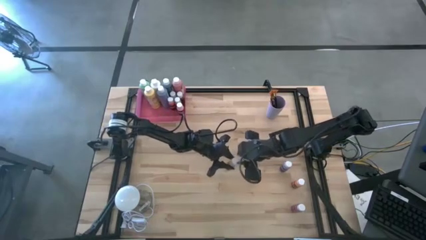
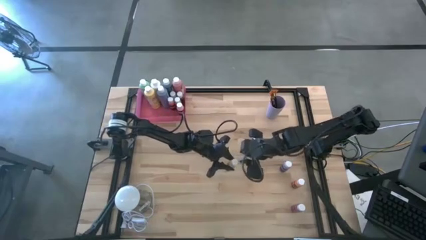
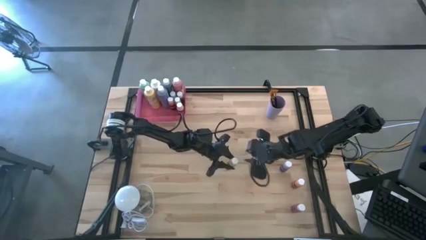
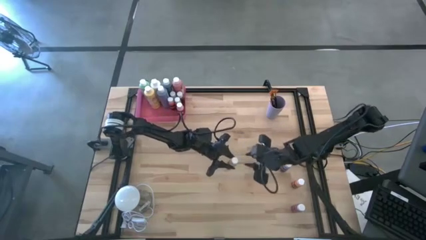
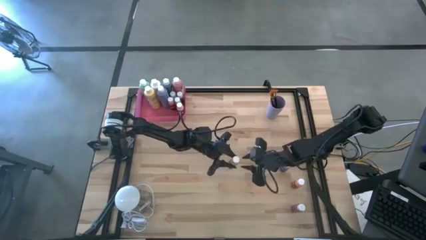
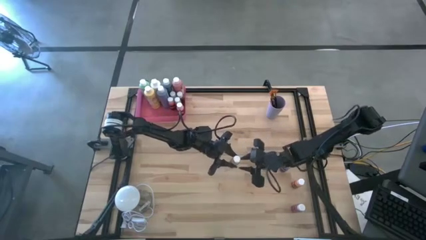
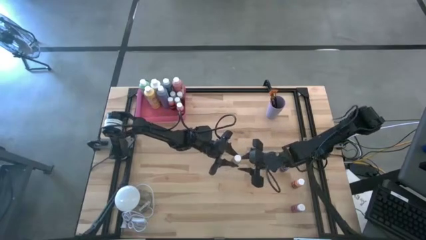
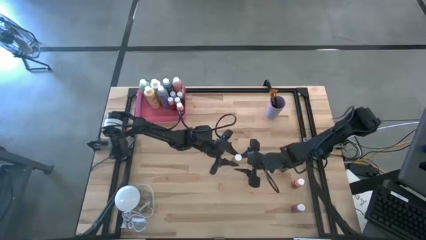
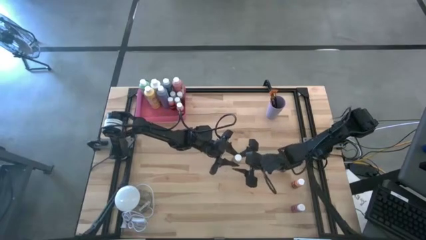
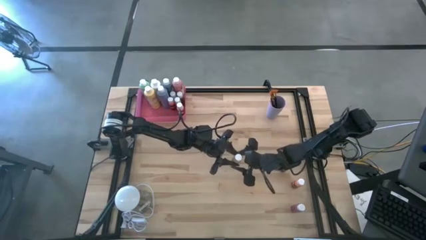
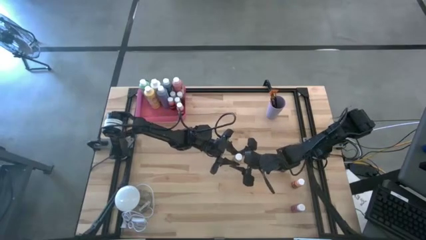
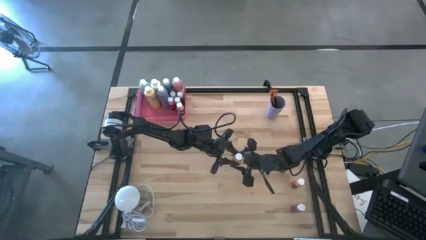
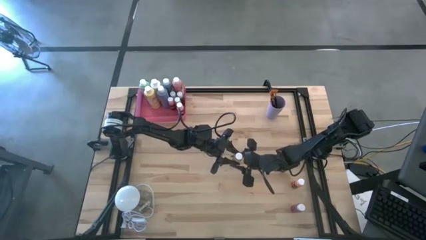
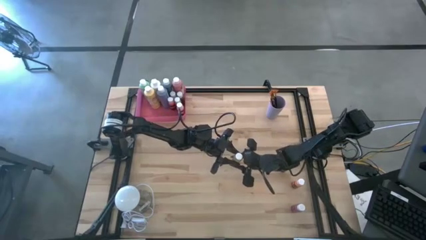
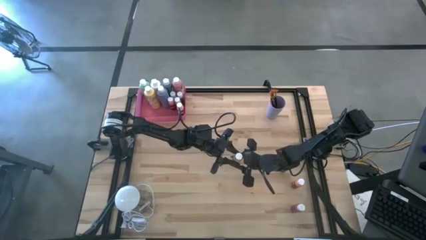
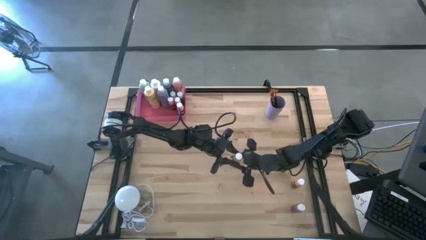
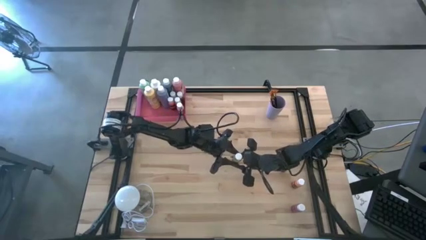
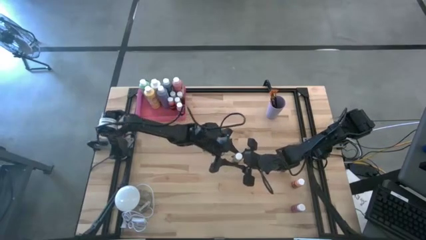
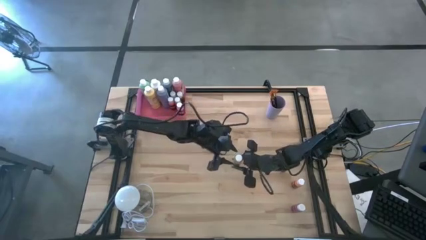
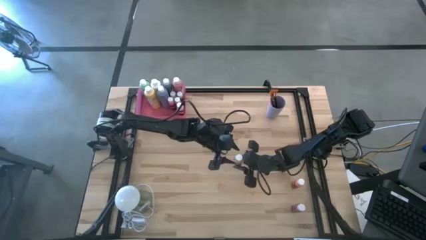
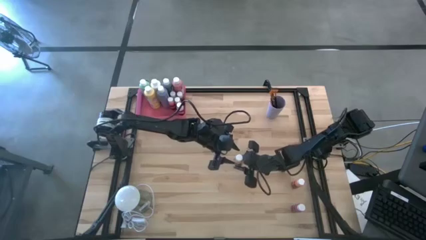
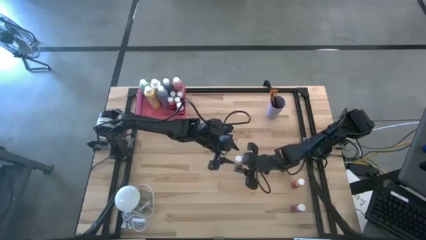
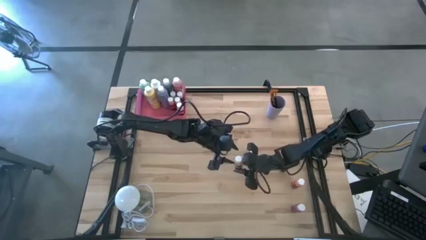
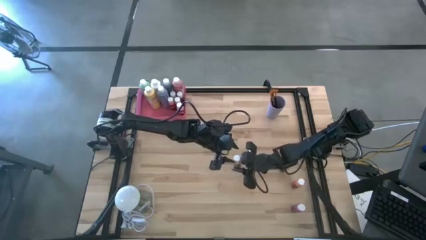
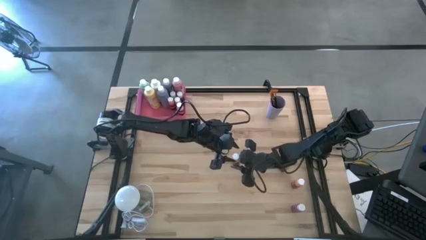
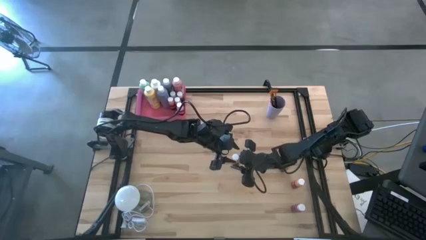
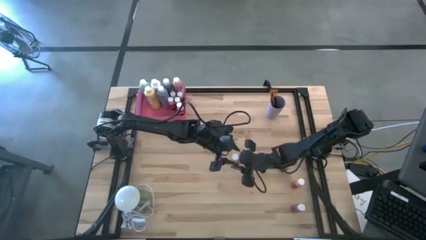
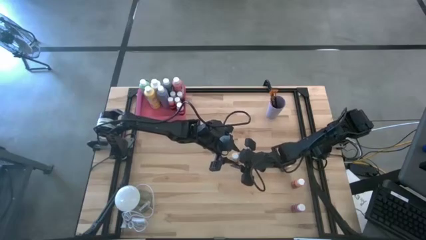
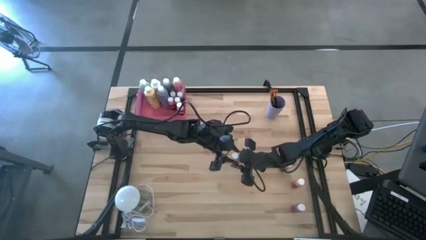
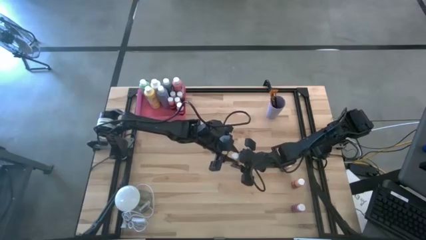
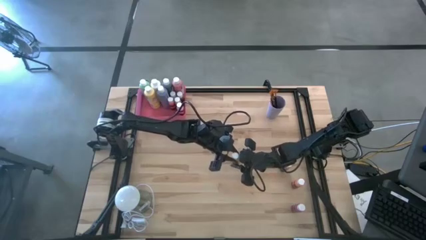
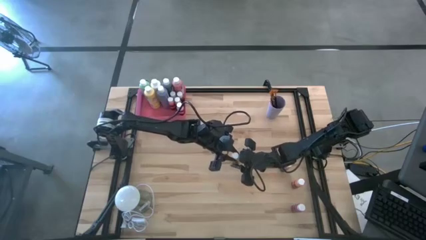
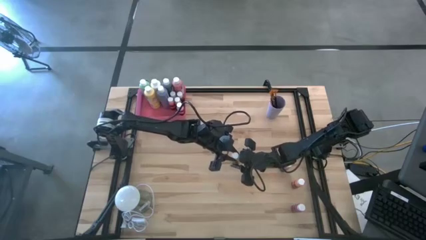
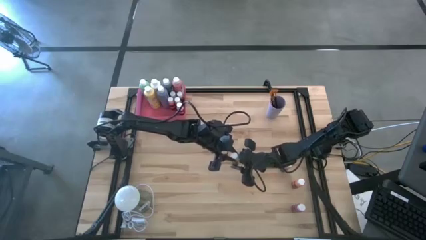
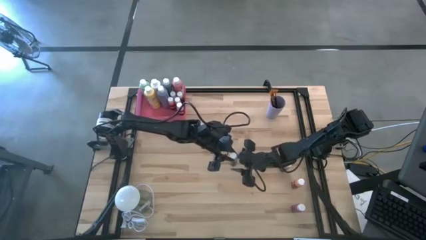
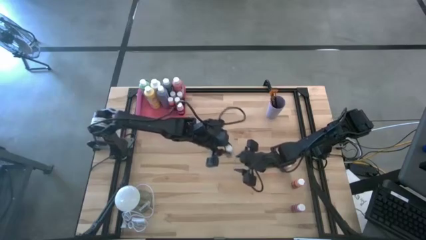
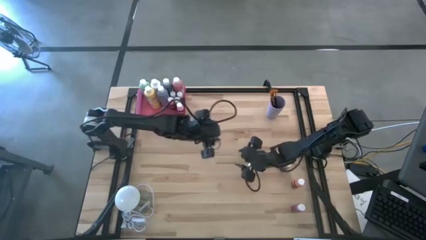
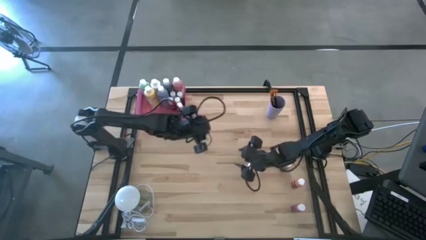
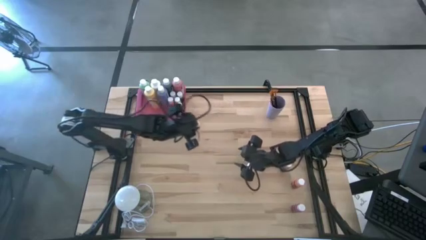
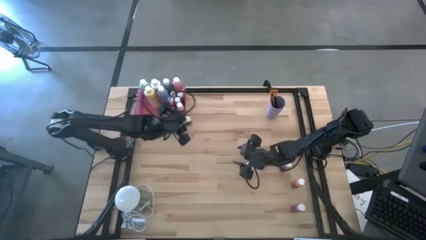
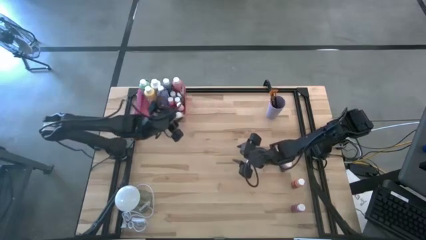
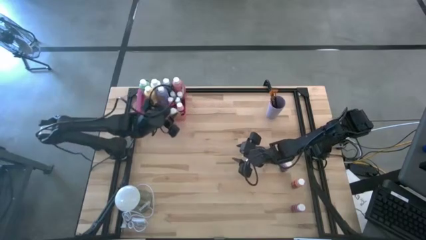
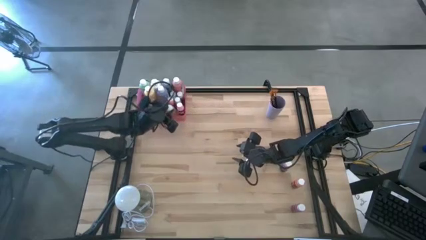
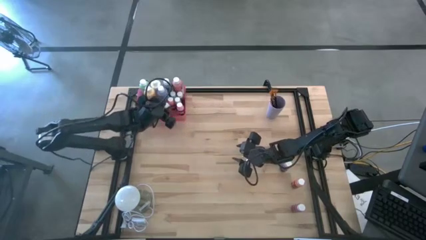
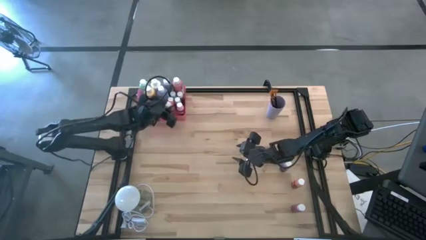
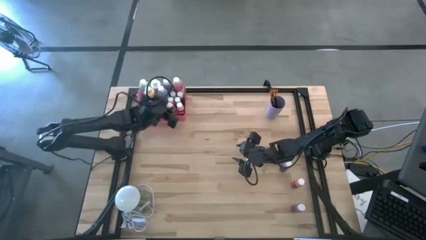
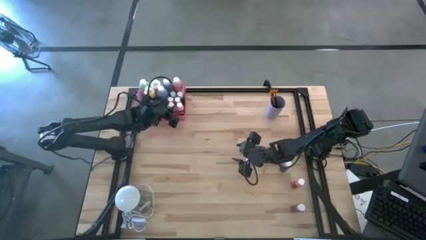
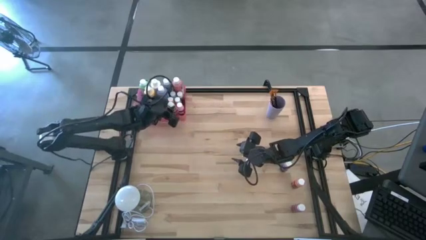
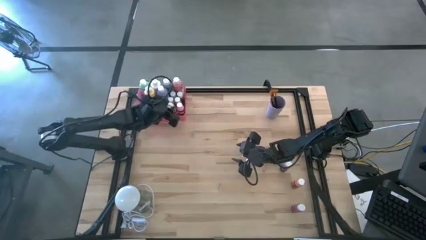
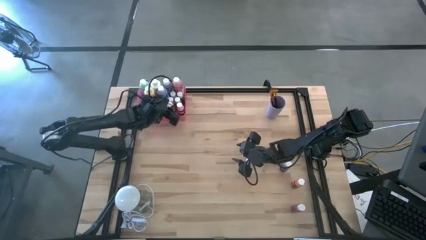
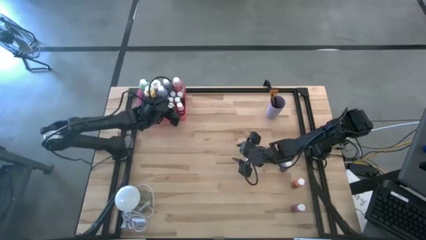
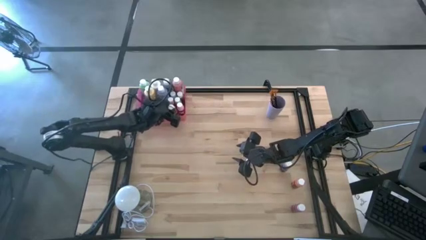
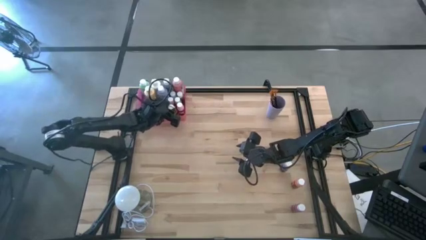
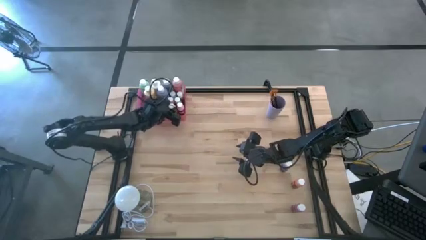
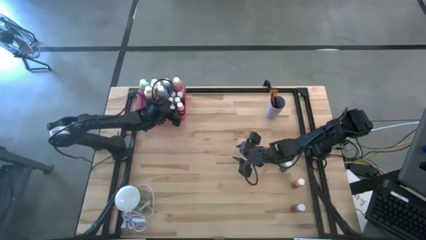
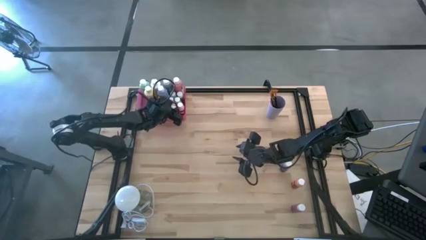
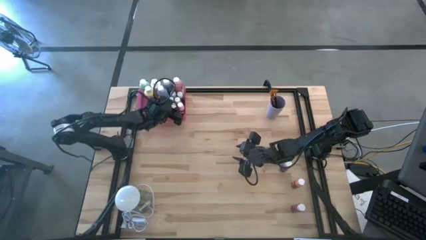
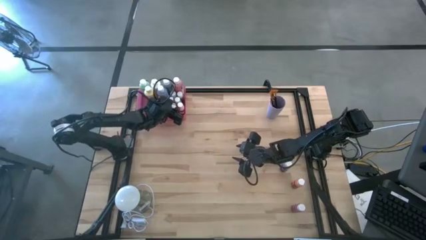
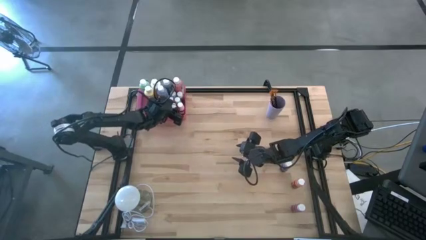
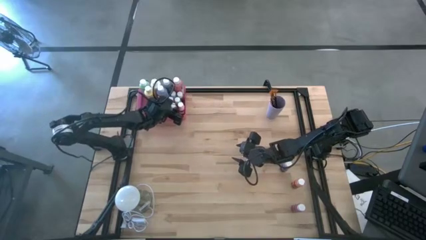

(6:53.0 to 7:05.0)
Task: Pick & Place Paint Supplies
Put the small yellow paint bottle into the pink bin

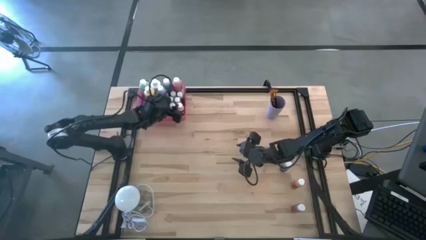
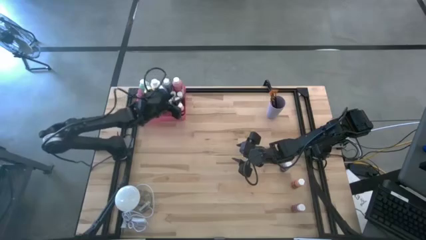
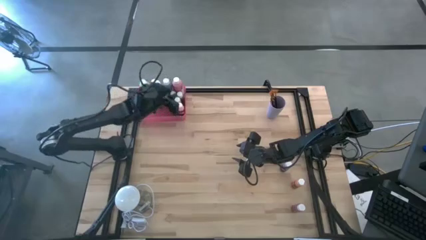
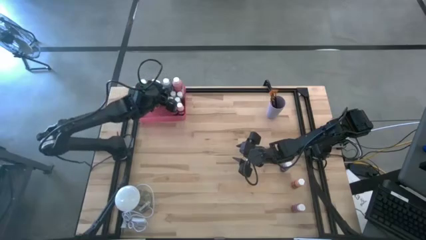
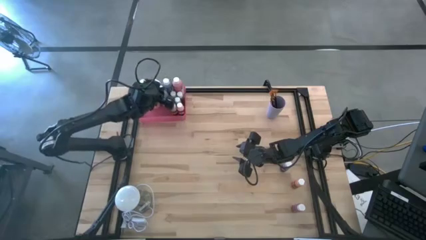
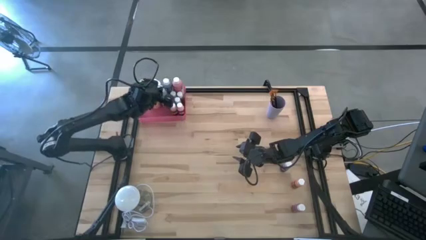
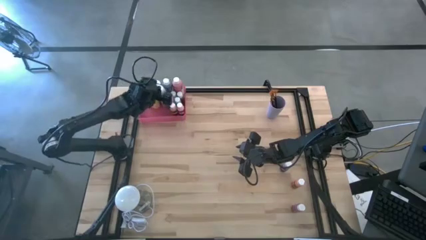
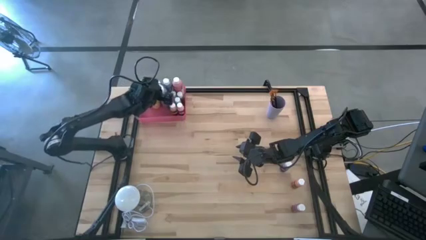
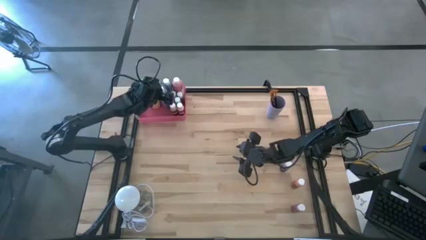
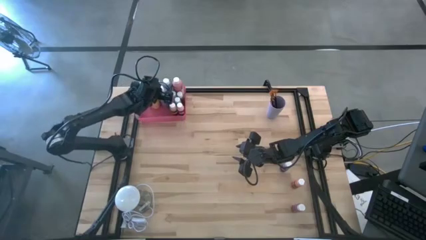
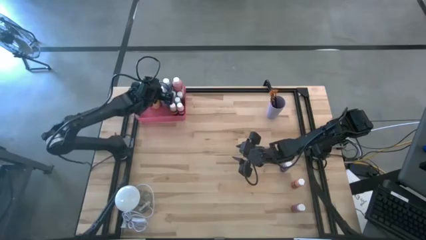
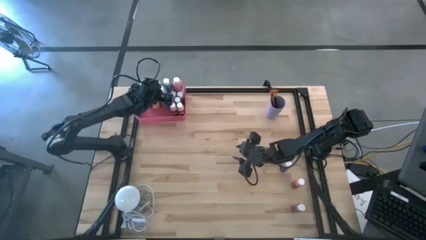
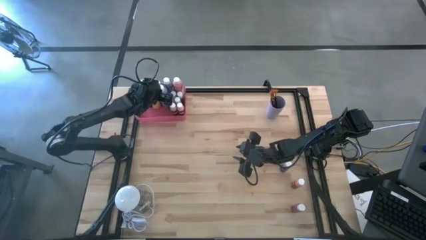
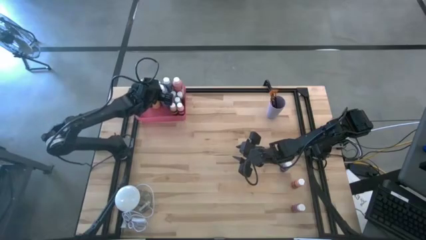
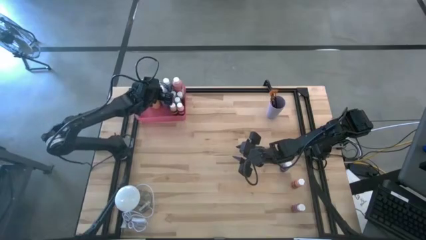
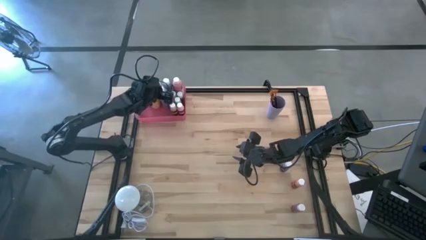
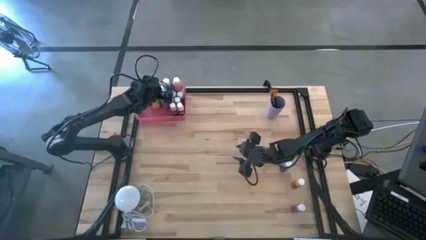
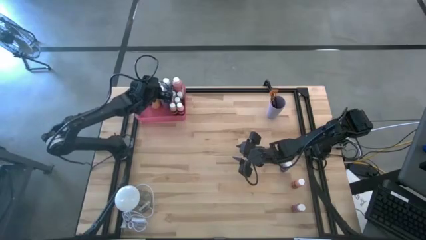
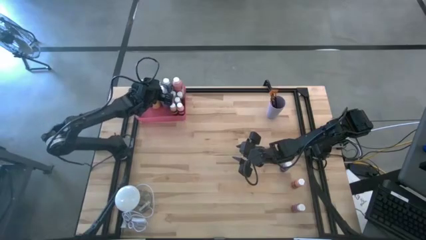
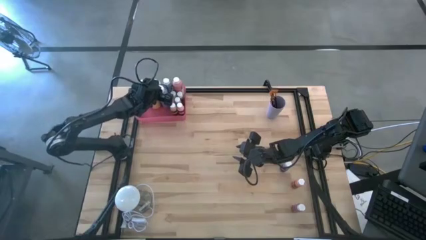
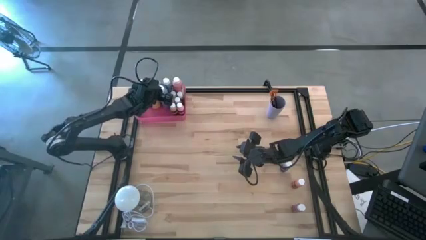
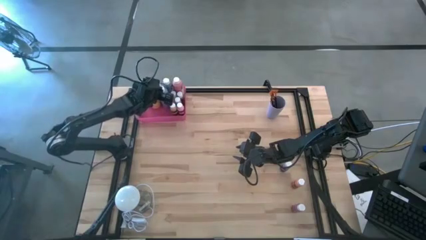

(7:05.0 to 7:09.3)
Adjust the large purple paint bottle in the pink bin
